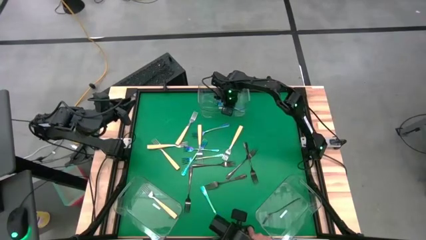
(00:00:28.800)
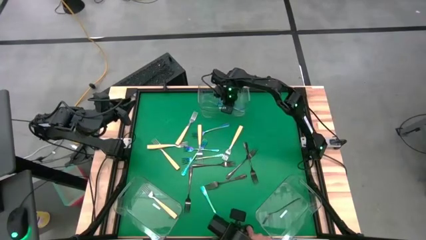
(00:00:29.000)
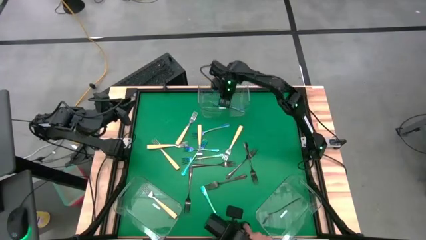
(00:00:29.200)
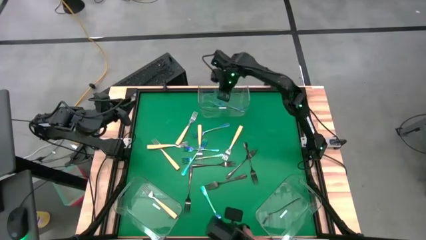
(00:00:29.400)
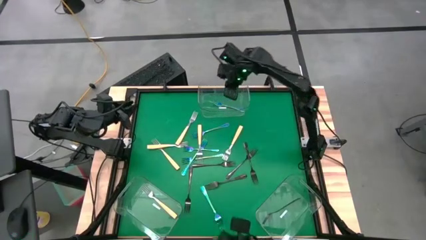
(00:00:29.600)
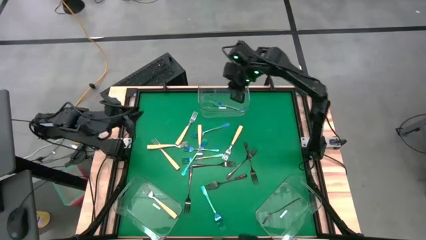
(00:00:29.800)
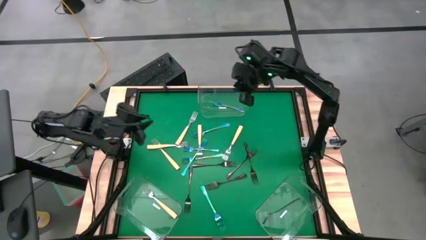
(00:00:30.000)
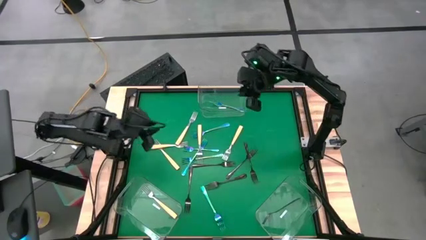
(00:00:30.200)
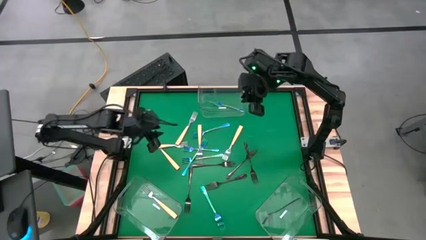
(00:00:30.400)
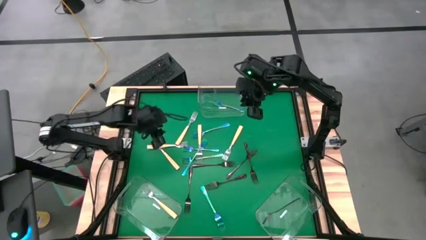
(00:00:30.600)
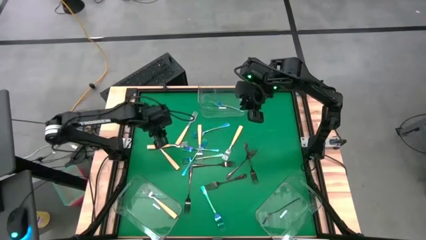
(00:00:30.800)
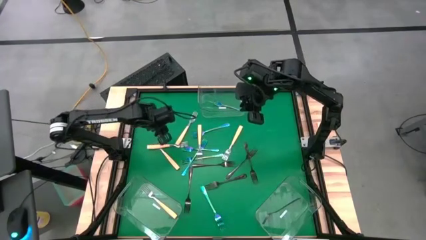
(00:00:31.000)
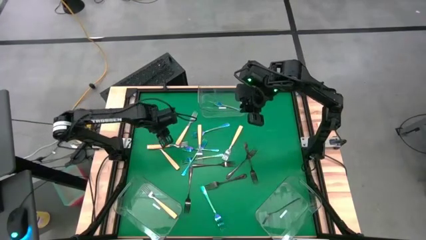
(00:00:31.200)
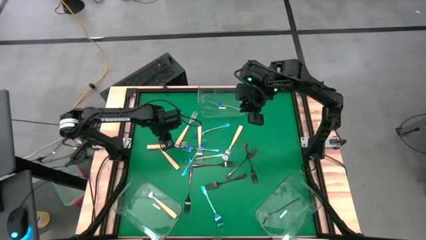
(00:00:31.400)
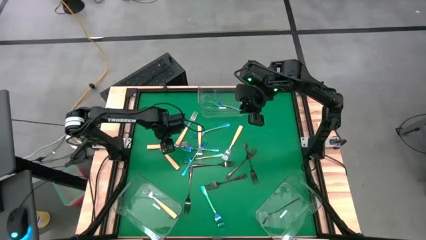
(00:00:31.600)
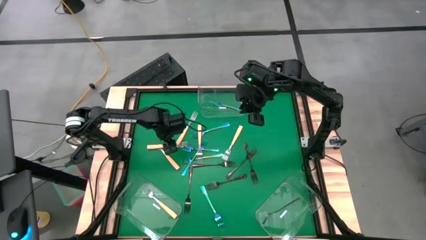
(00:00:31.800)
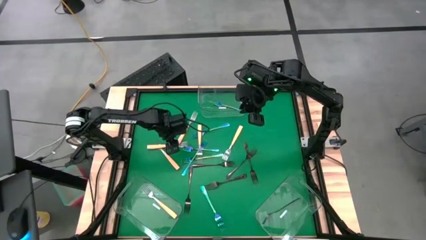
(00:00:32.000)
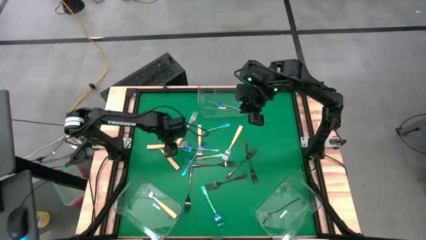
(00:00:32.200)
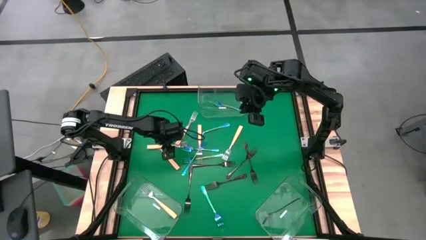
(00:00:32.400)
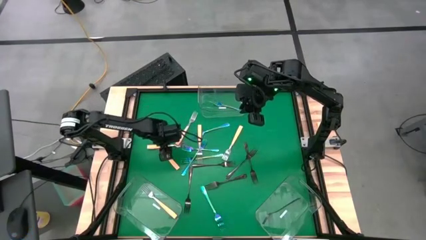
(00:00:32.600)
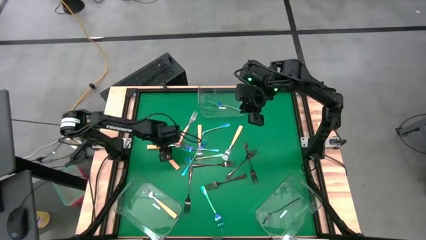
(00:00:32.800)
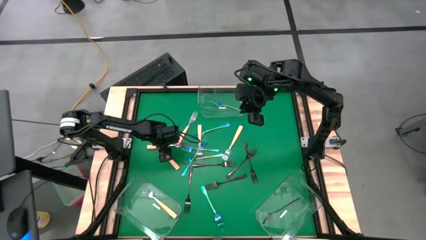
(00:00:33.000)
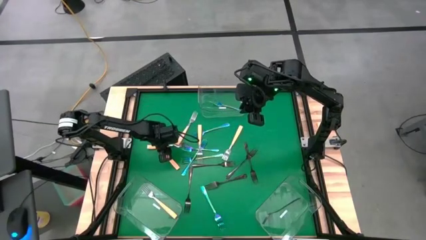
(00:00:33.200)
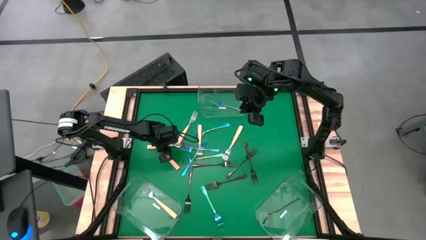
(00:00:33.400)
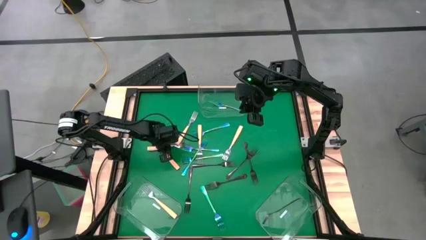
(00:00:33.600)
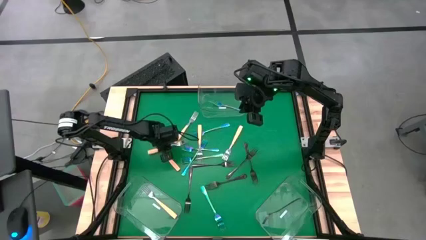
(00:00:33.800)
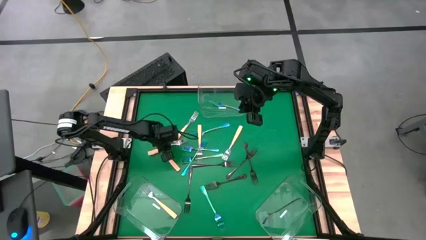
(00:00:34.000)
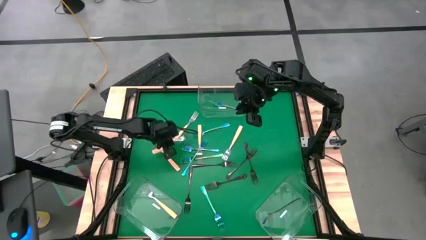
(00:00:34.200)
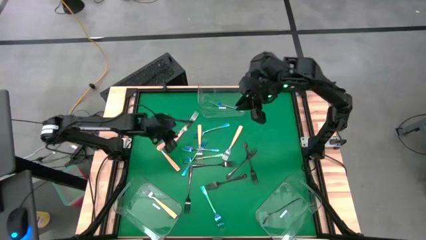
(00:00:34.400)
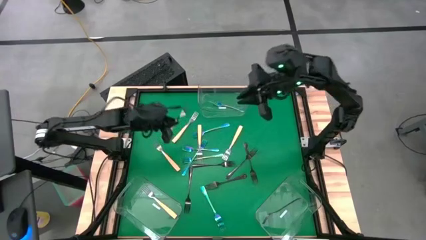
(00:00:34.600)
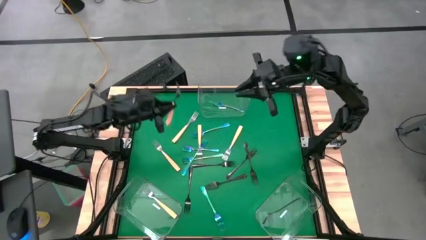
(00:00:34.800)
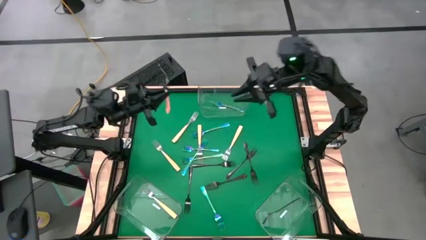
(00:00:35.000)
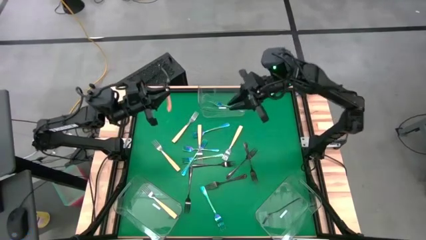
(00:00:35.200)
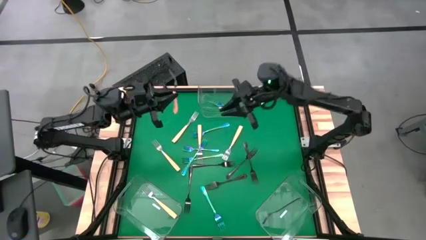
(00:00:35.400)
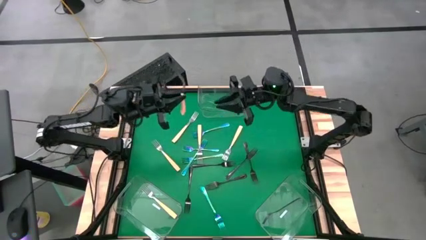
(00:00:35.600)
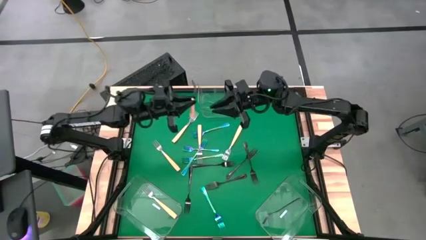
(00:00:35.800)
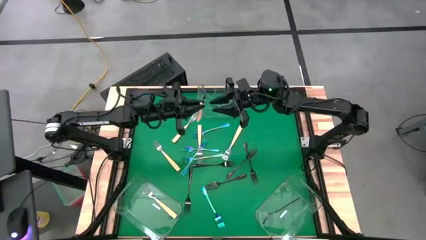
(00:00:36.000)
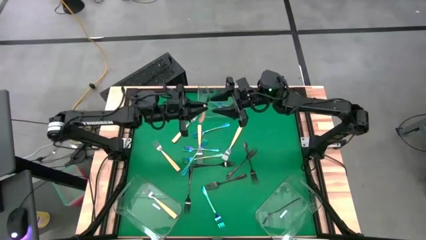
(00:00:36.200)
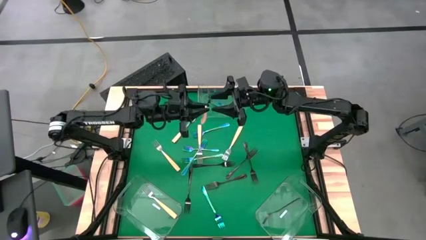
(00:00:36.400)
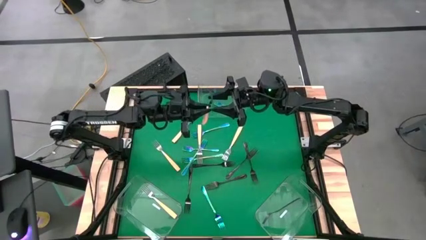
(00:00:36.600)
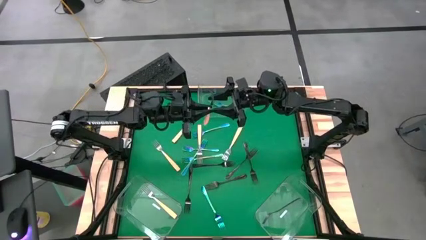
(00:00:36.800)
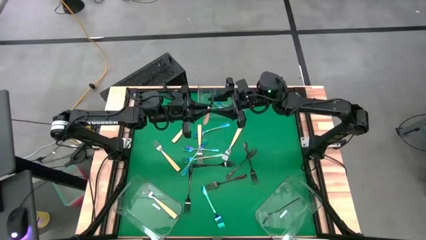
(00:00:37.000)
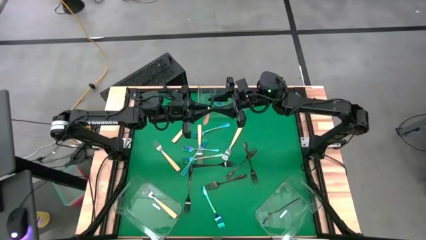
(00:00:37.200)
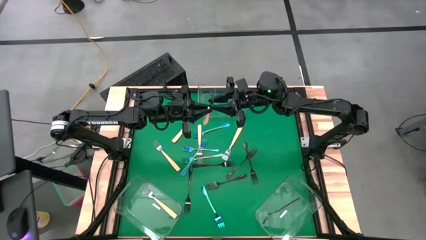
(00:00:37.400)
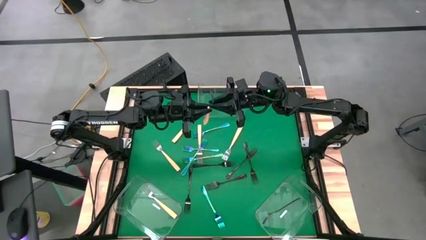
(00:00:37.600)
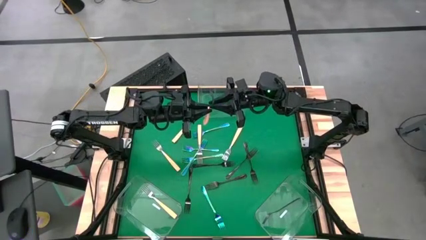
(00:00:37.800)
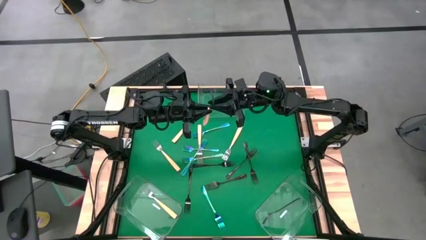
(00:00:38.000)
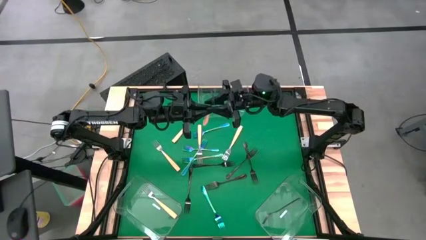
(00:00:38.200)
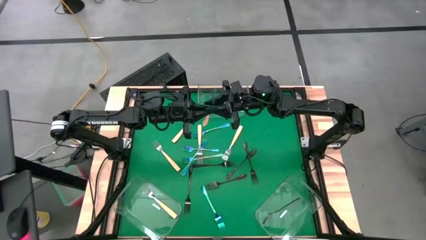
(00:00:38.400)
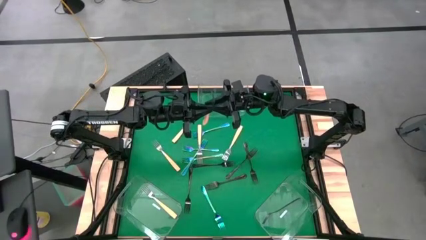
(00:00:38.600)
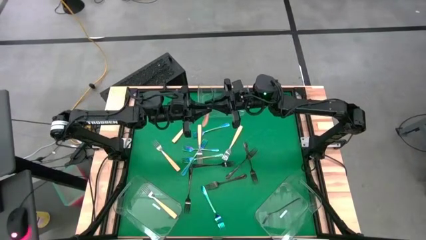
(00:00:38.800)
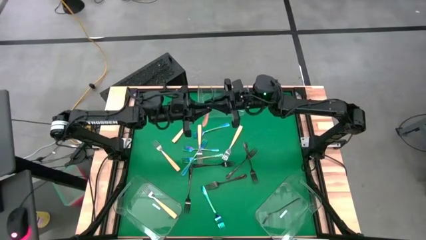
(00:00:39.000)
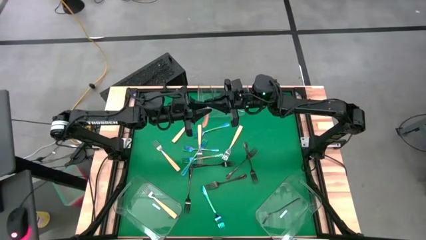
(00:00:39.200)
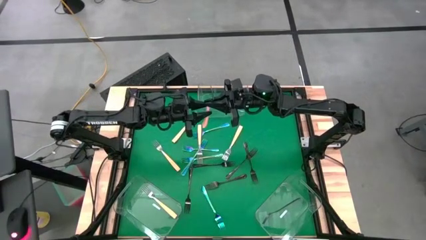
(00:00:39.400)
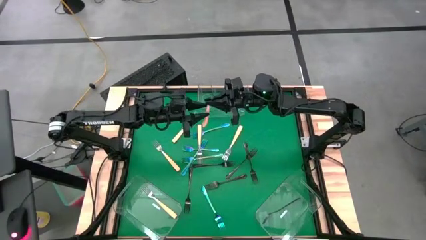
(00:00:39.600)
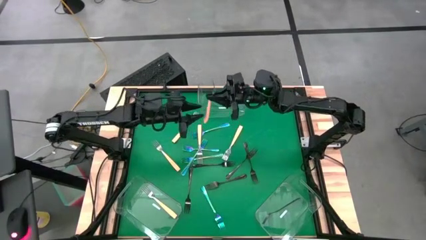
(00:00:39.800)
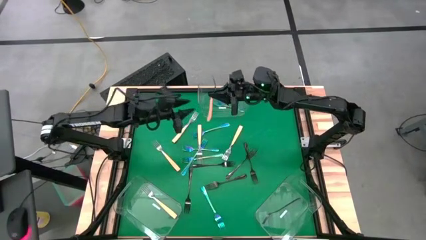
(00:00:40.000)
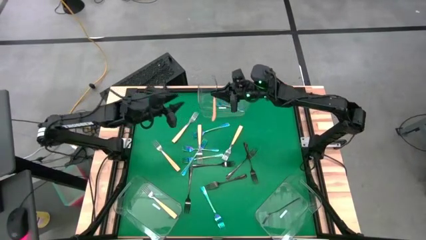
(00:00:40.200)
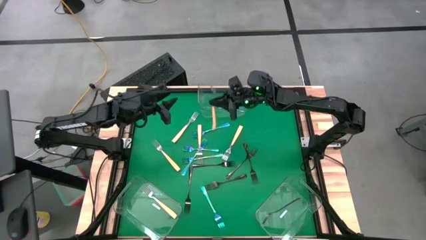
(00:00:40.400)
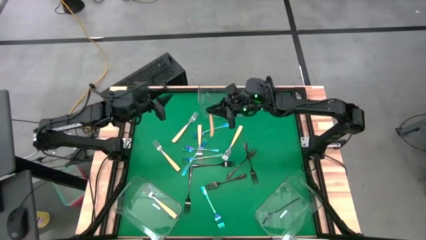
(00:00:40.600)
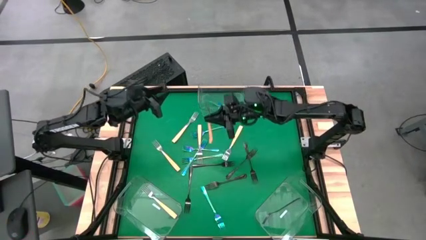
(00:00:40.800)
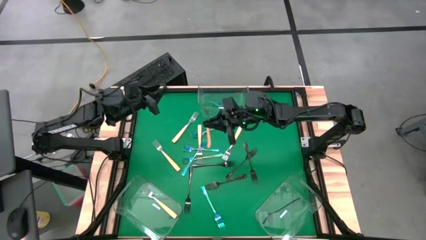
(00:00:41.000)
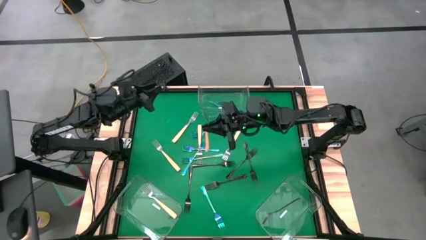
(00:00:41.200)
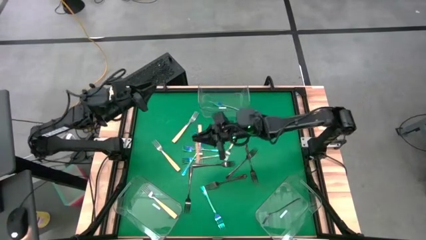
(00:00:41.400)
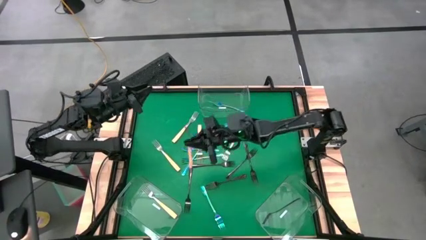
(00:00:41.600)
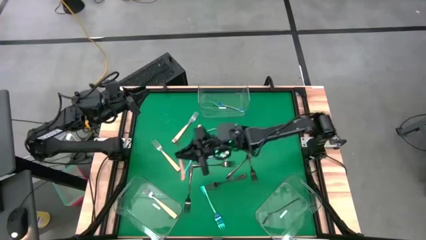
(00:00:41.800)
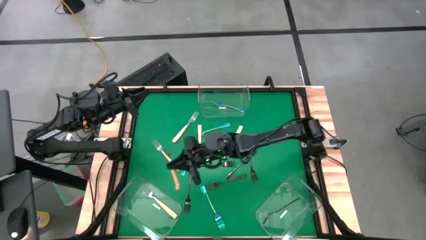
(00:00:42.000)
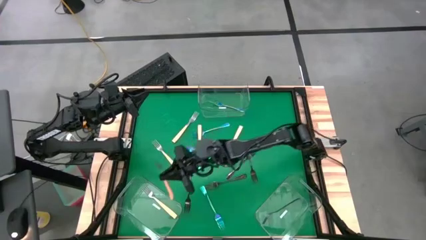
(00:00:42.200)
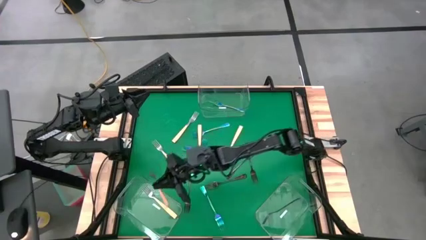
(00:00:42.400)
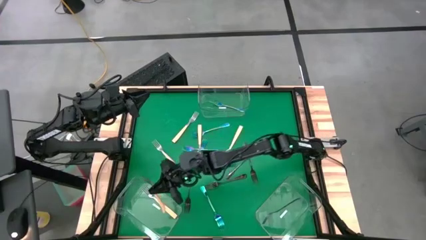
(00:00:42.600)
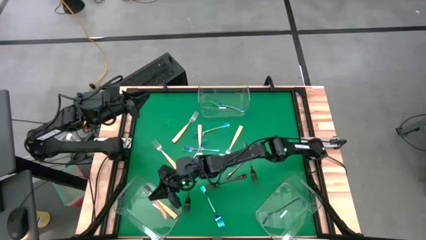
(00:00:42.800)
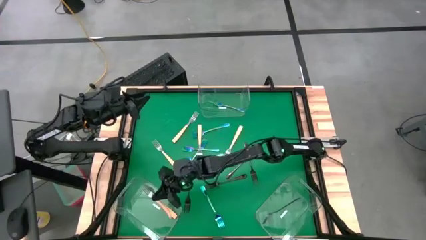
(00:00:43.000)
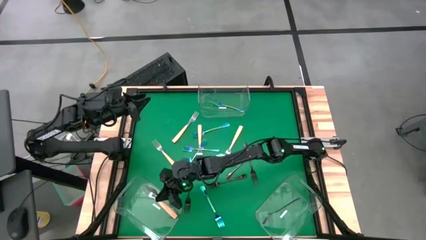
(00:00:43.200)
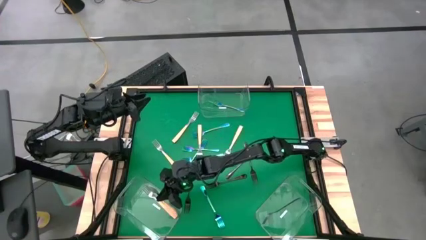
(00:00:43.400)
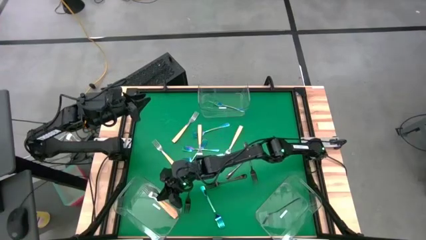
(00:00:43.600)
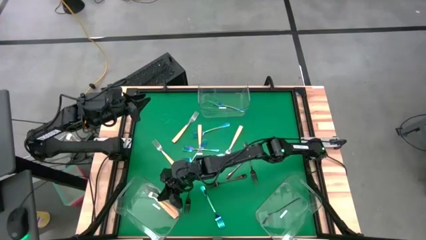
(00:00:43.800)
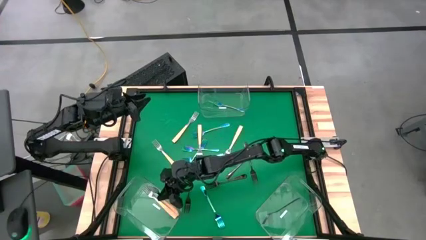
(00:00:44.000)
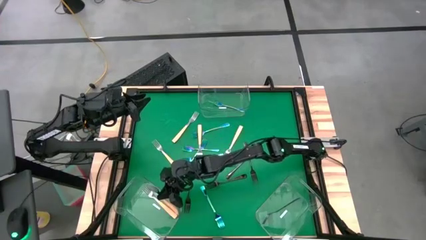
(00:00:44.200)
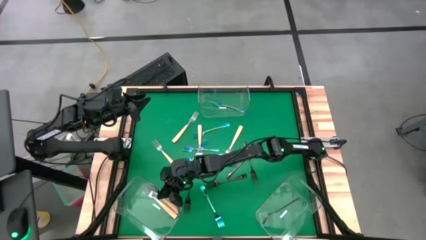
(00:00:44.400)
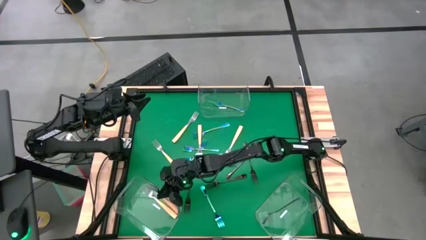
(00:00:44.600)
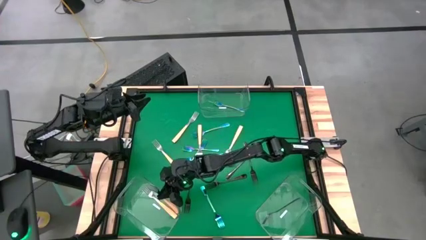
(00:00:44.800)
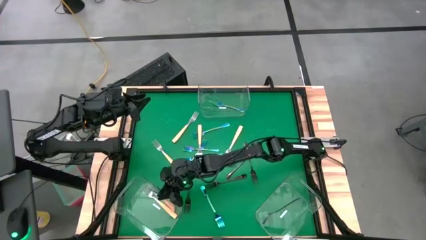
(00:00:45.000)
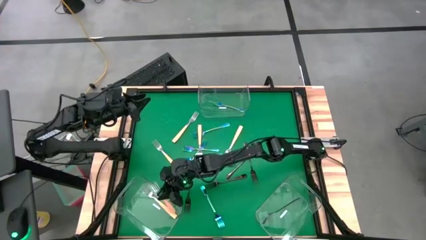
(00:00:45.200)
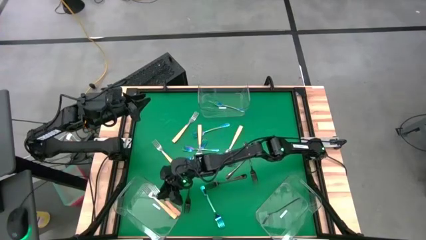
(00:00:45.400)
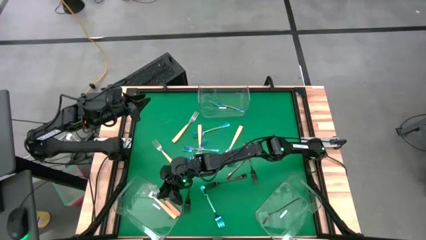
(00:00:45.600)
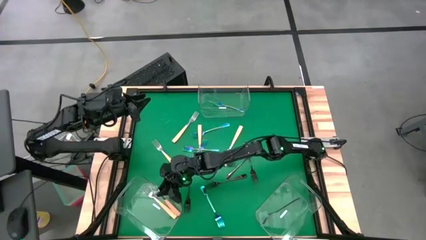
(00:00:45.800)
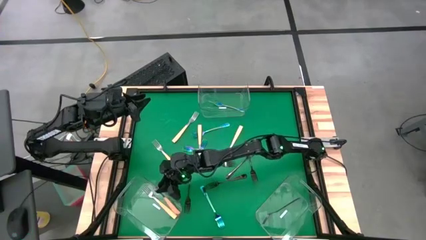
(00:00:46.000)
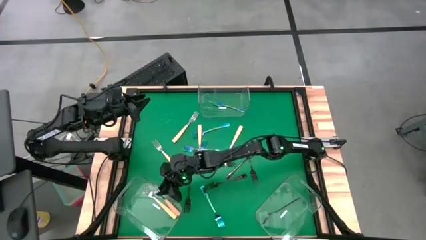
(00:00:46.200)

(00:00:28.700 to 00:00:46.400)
Task: Sort silverware by color (type)
Put the orange fork into the bottom left transparent bin
